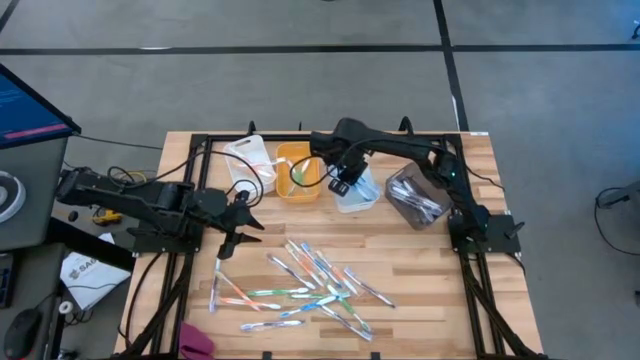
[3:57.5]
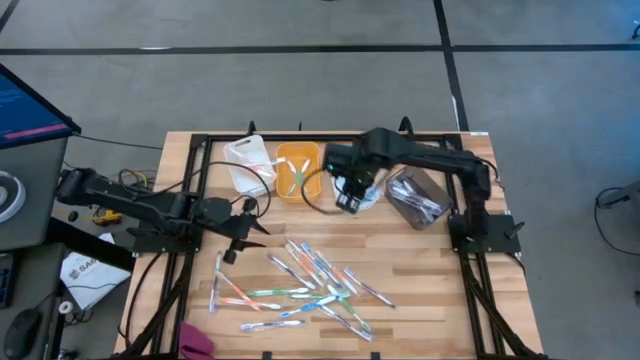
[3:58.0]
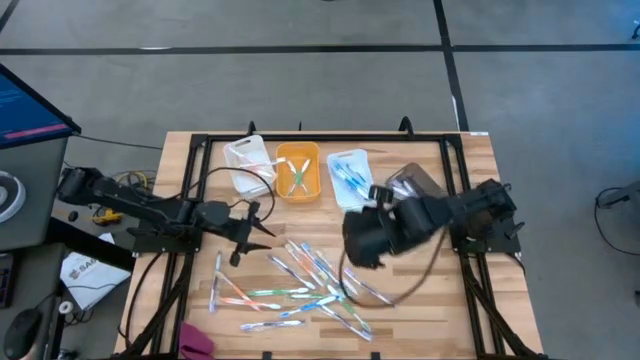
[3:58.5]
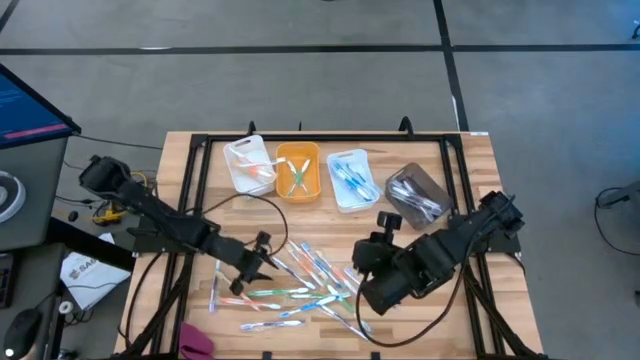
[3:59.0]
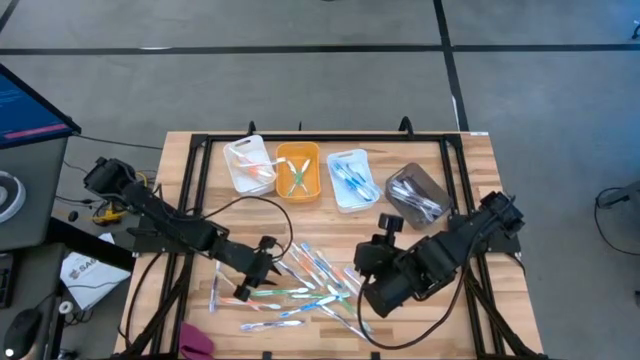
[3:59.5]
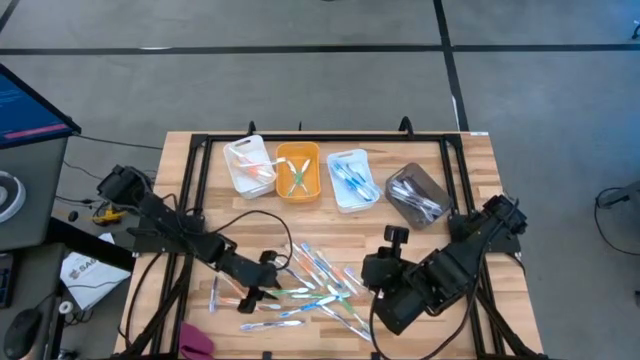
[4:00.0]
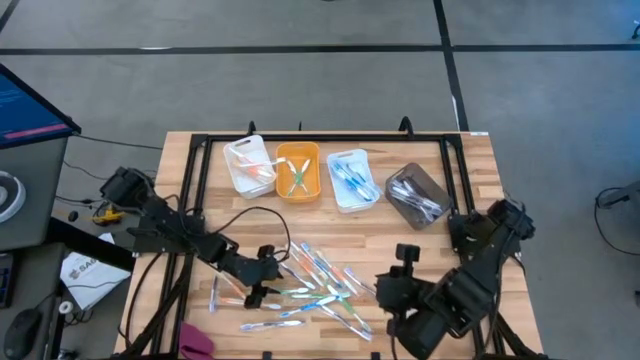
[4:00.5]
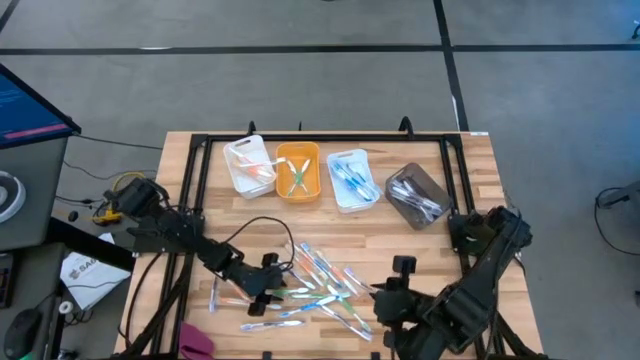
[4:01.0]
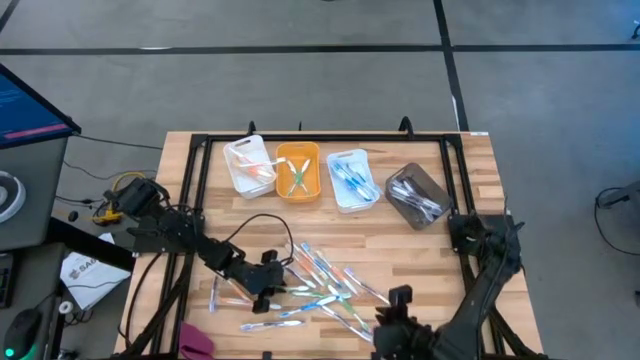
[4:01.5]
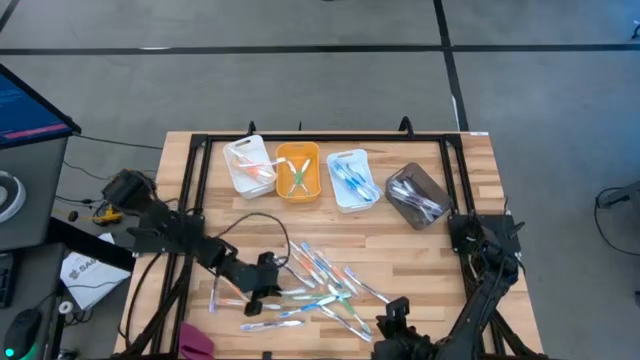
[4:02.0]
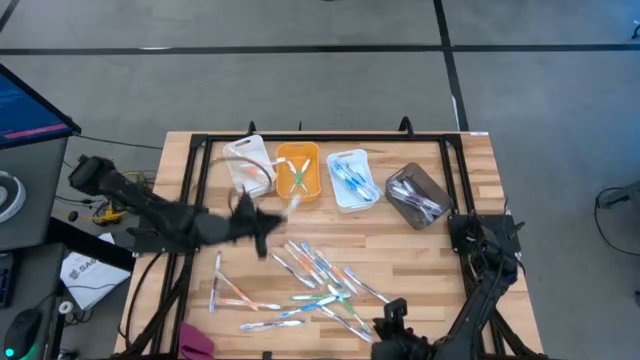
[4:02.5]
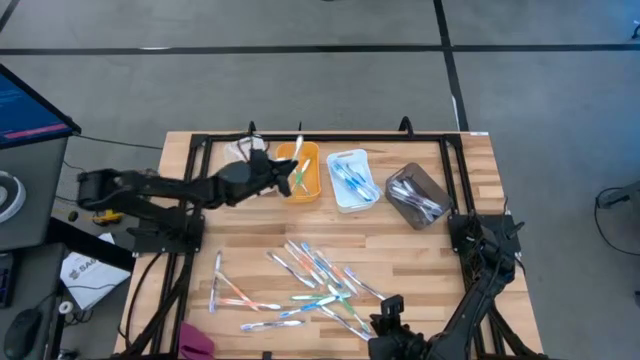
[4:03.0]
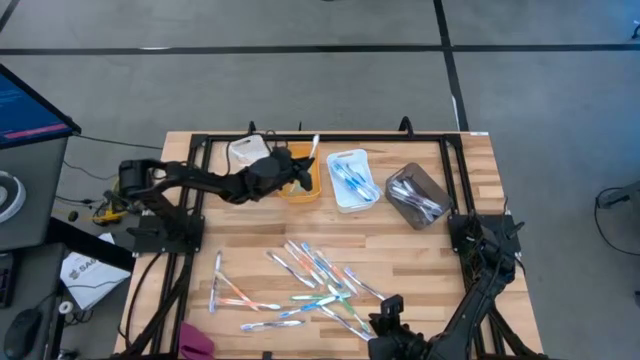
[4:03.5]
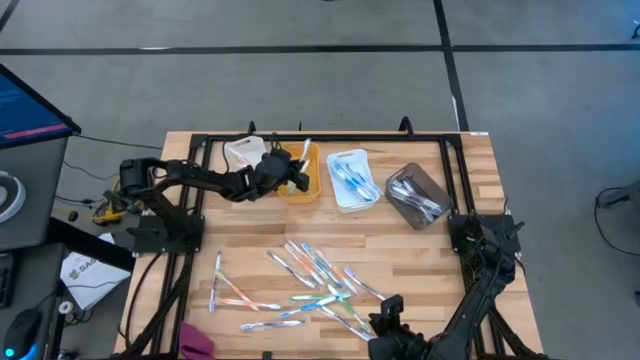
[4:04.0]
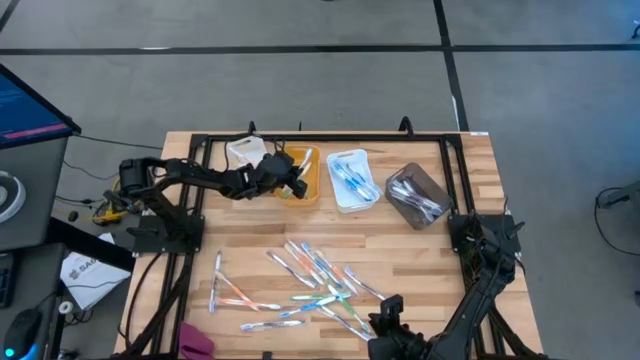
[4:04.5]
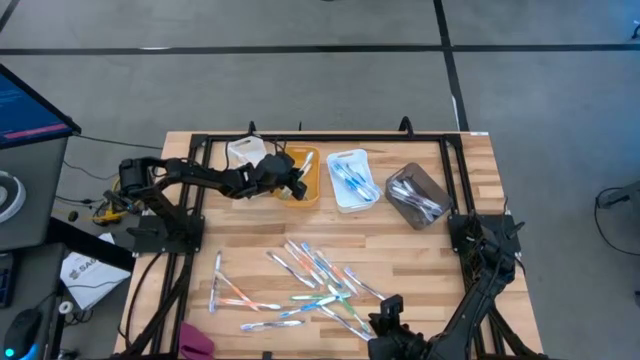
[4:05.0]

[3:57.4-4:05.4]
Task: Pick & Place Toothbrushes
Put the white green toothbrush into the yellow bin

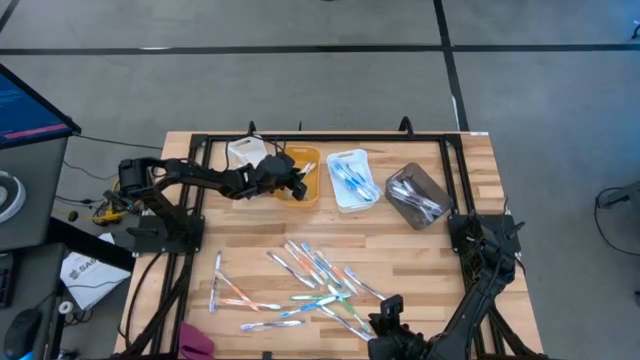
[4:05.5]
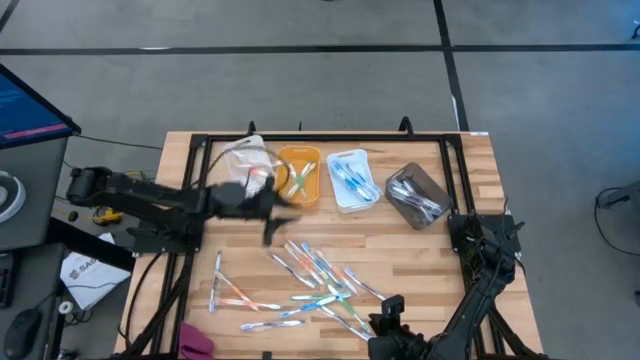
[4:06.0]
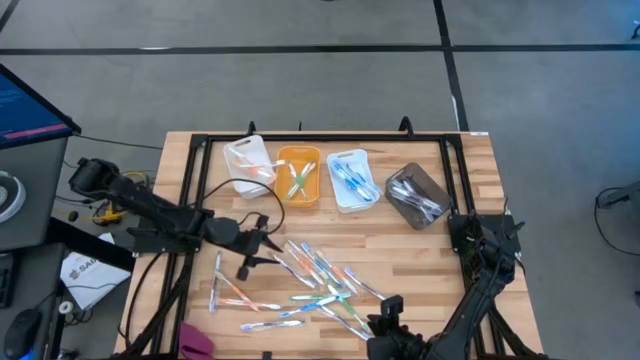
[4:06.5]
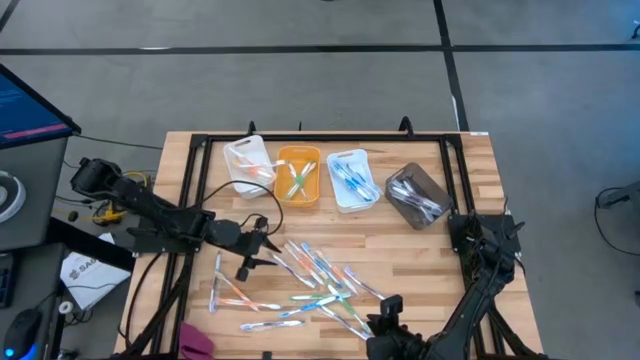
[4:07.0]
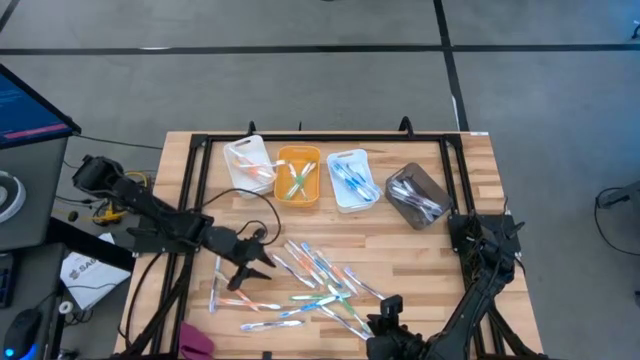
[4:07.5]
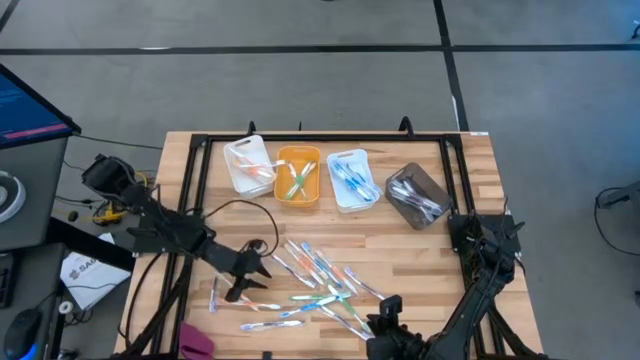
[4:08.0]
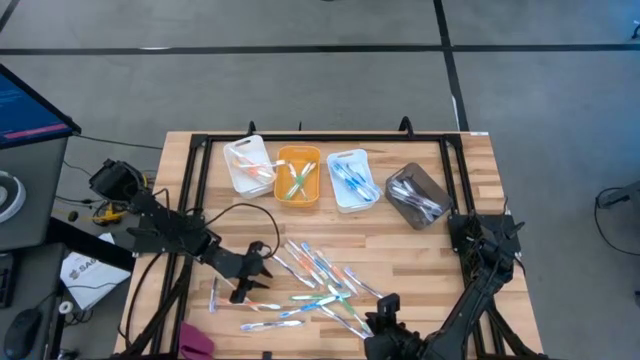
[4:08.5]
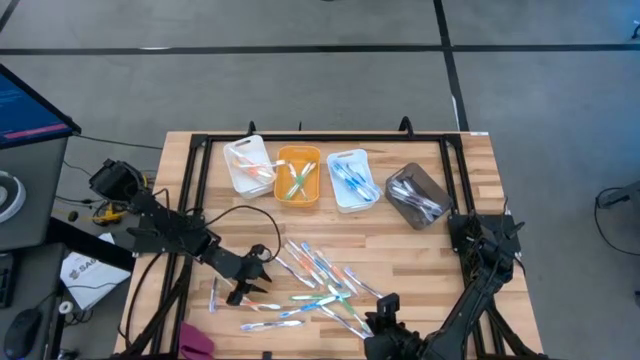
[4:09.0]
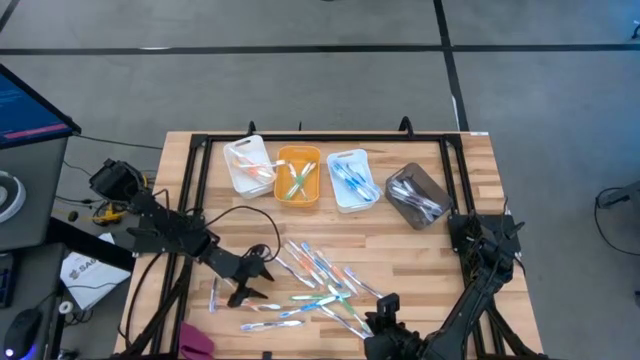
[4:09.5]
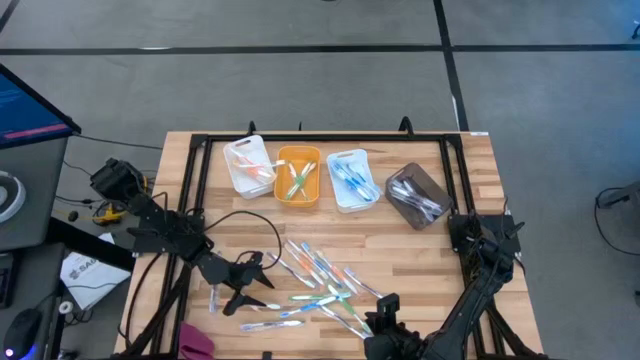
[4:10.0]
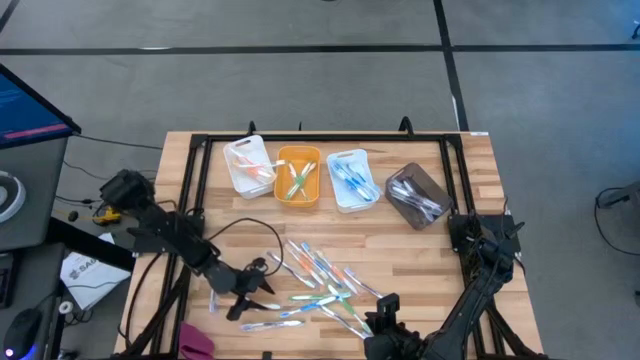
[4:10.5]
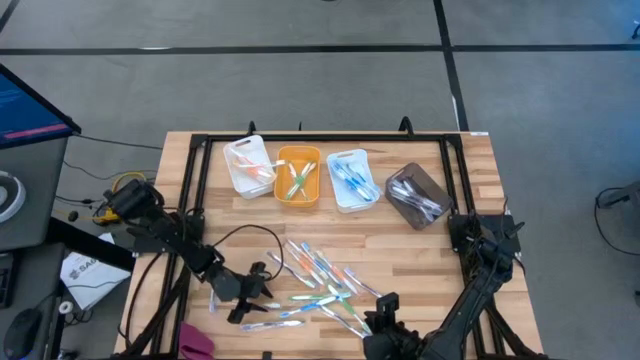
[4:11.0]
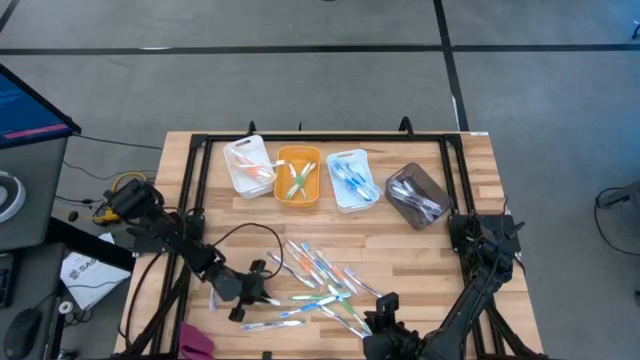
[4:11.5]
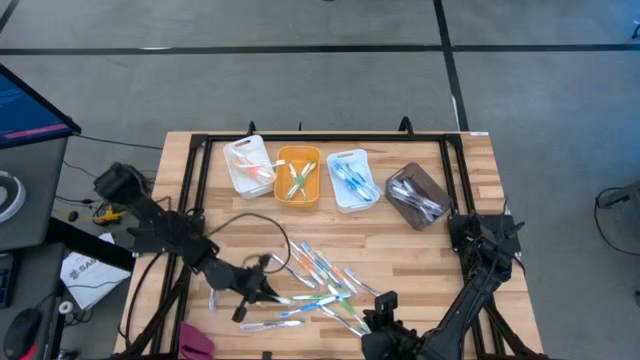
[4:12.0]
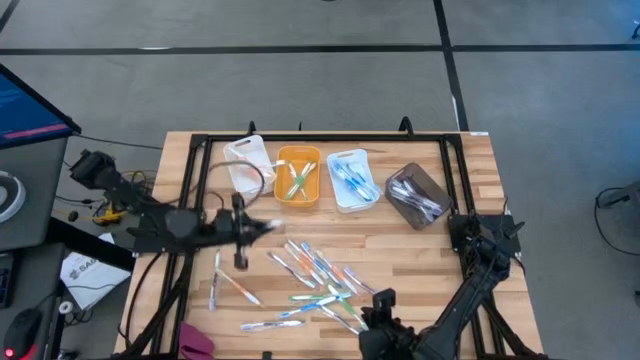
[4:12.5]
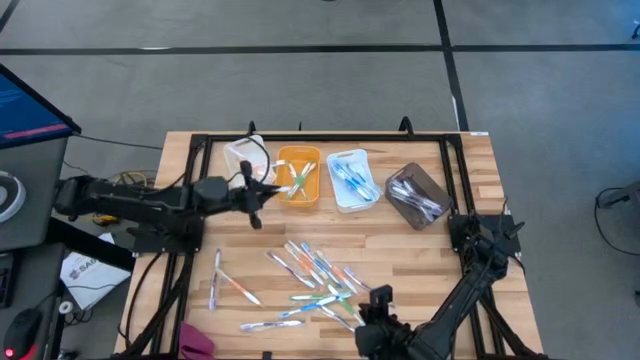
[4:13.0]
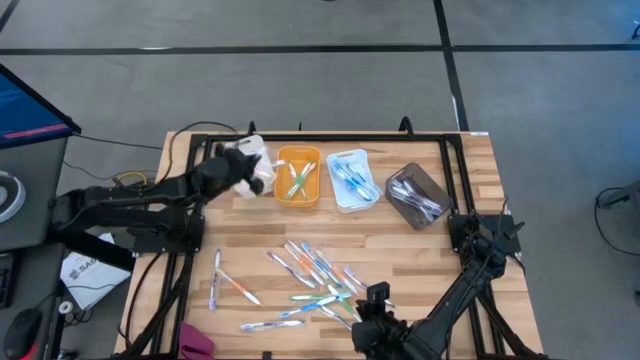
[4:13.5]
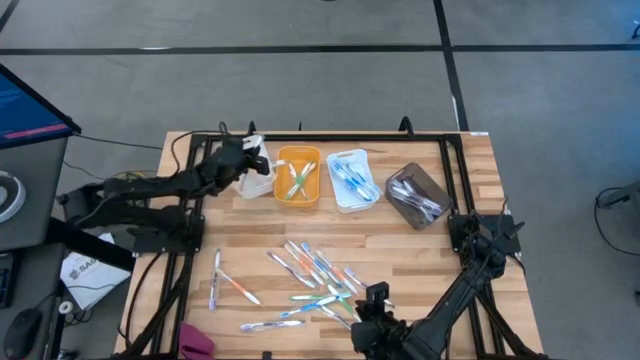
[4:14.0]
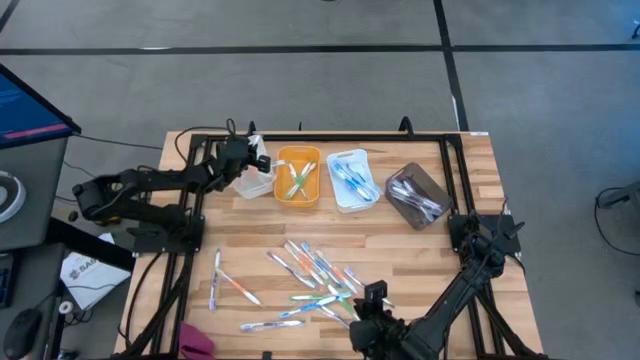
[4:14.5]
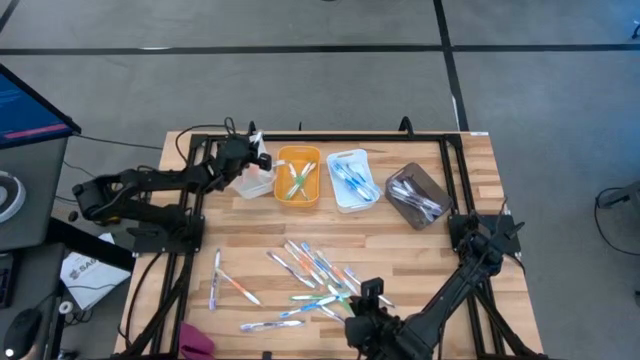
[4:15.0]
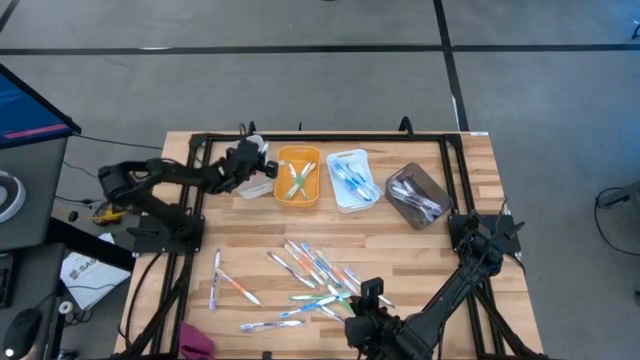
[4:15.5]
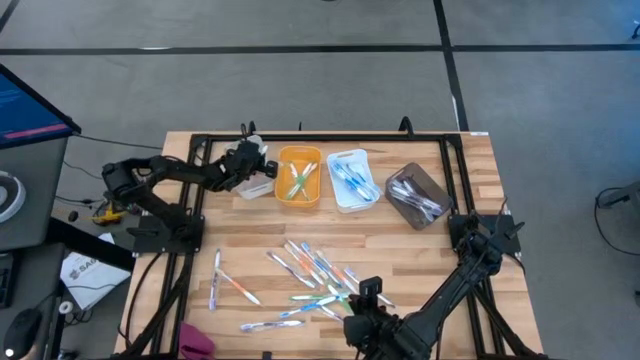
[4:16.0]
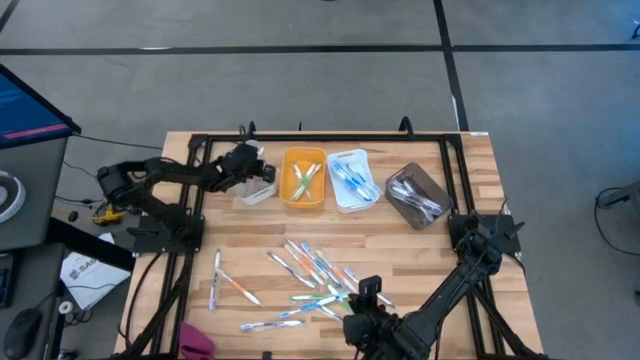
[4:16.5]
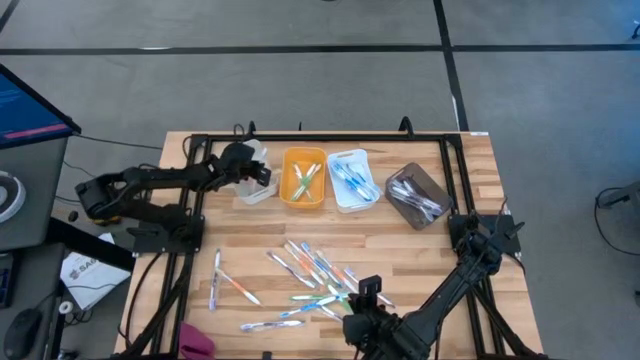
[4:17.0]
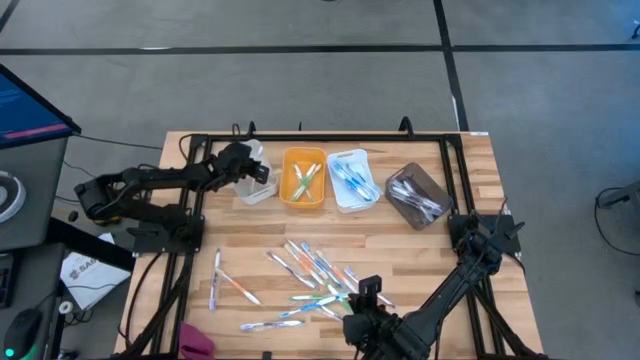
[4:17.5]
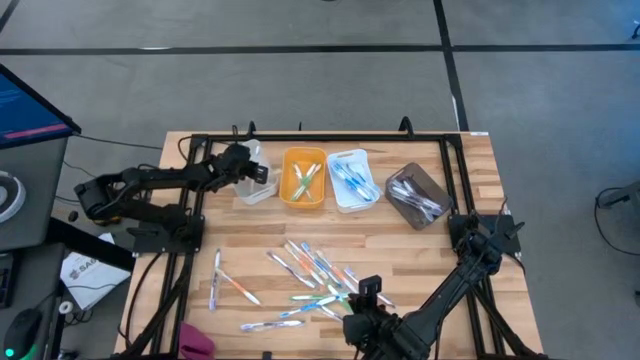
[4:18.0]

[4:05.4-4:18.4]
Put the white orange toothbrush into the left white bin

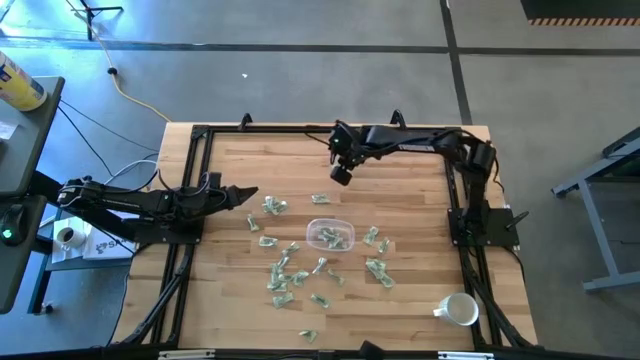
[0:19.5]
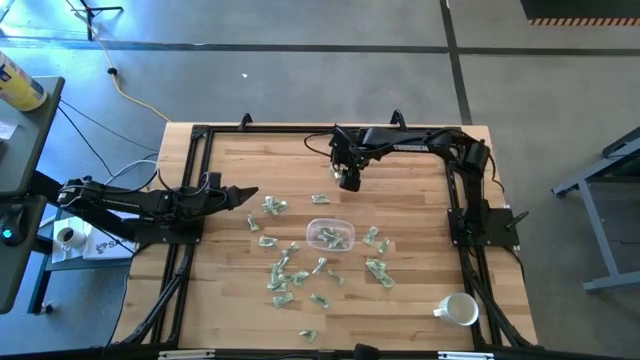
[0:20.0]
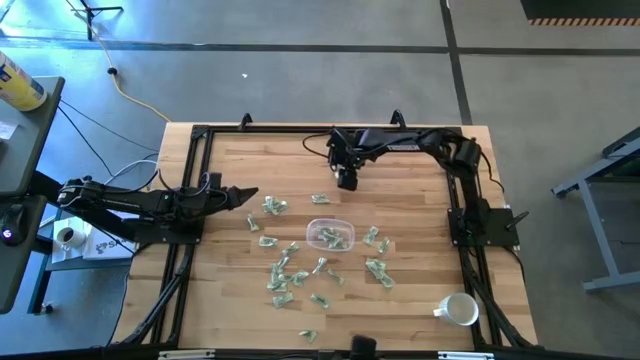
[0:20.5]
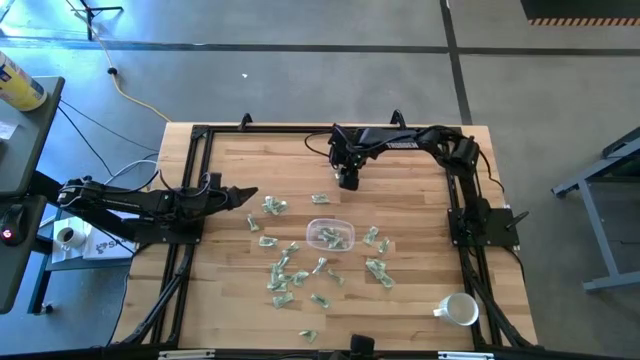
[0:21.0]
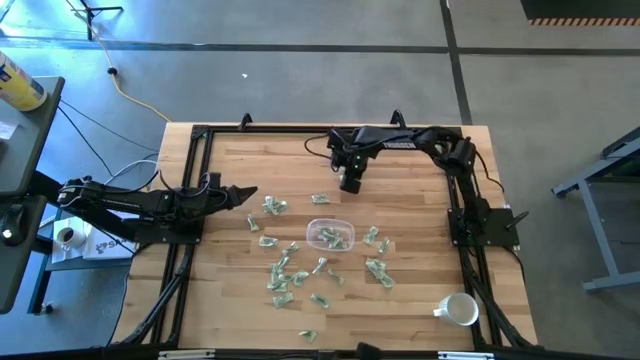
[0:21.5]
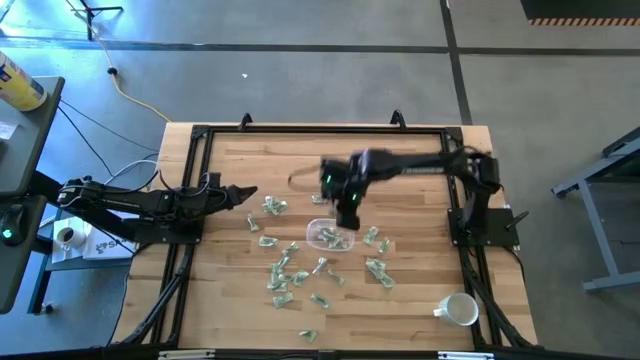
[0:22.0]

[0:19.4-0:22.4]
Task: Pick and place Stevia / Truvia into bins
Put the green stevia packet into the transparent container
